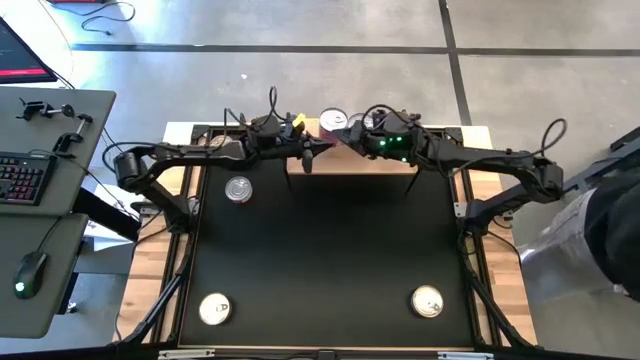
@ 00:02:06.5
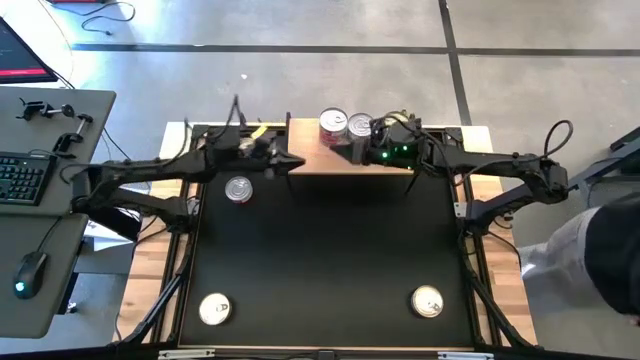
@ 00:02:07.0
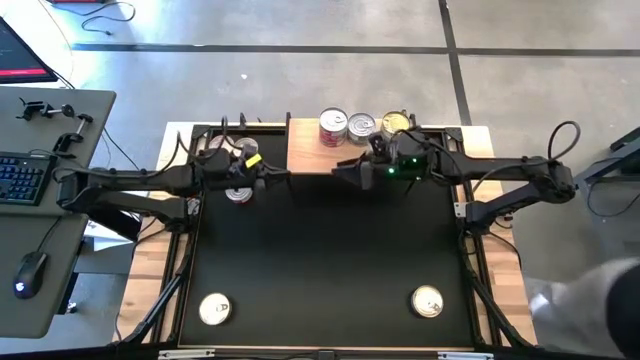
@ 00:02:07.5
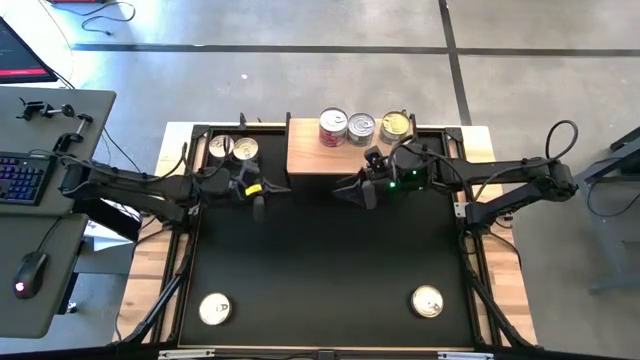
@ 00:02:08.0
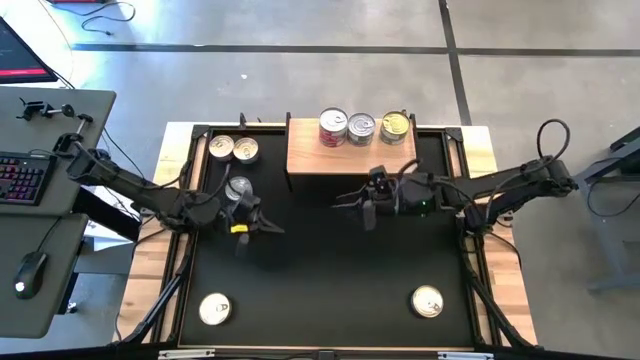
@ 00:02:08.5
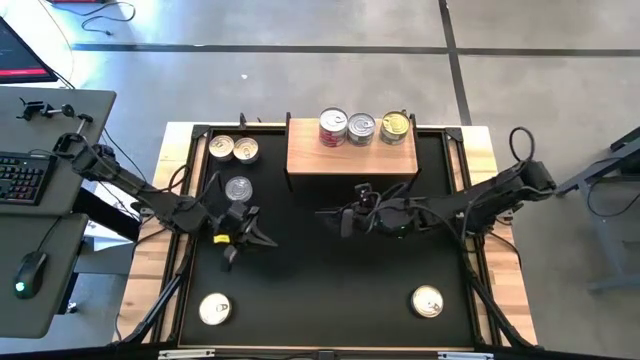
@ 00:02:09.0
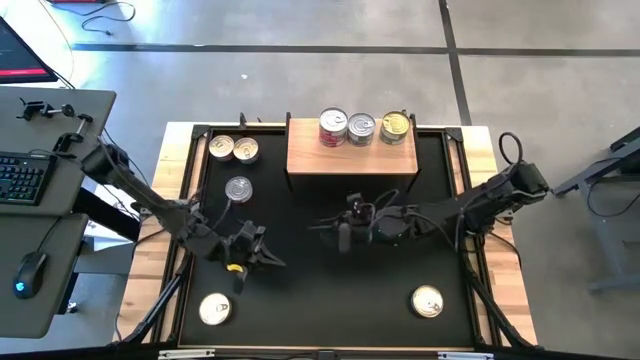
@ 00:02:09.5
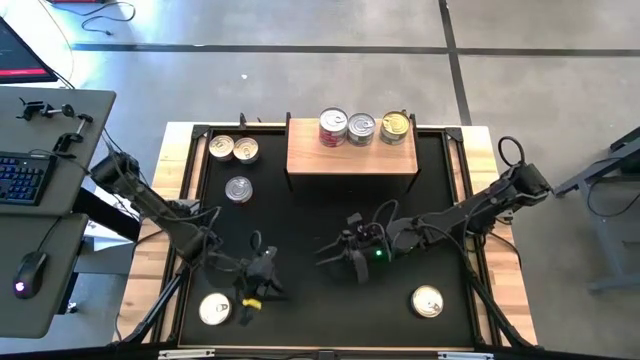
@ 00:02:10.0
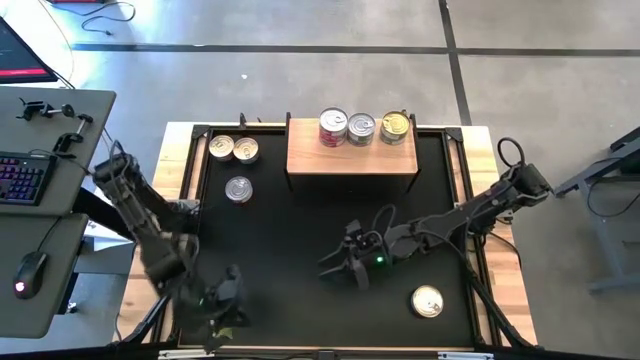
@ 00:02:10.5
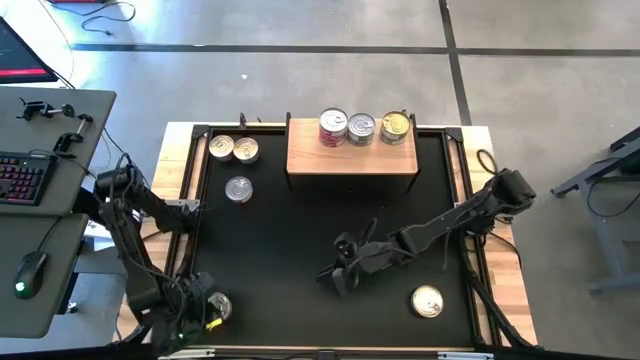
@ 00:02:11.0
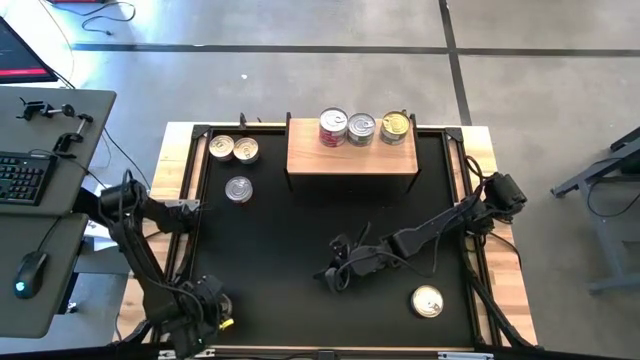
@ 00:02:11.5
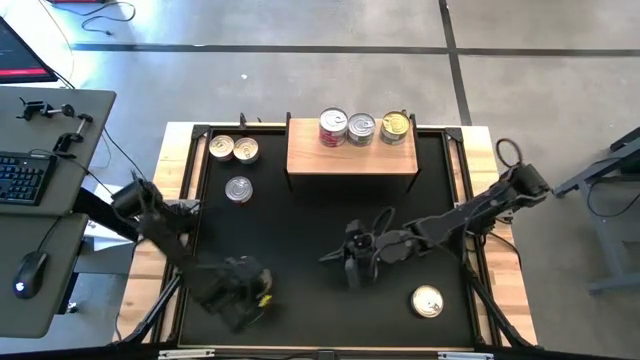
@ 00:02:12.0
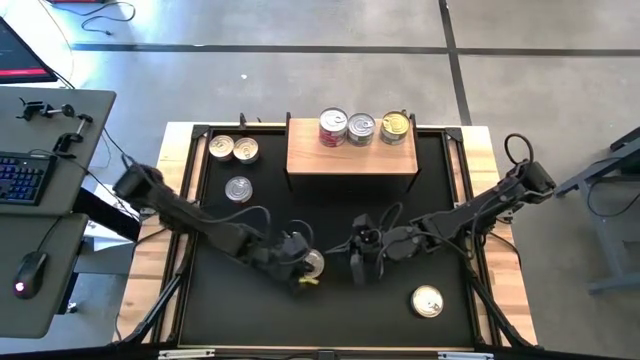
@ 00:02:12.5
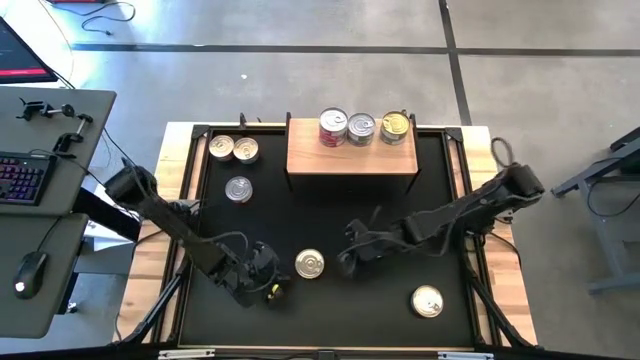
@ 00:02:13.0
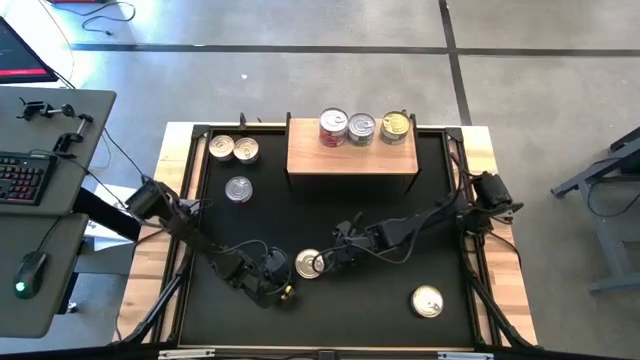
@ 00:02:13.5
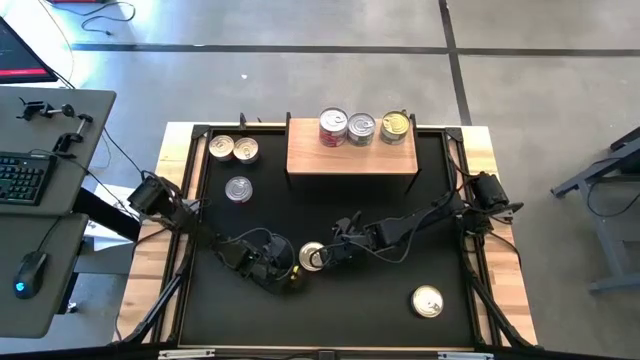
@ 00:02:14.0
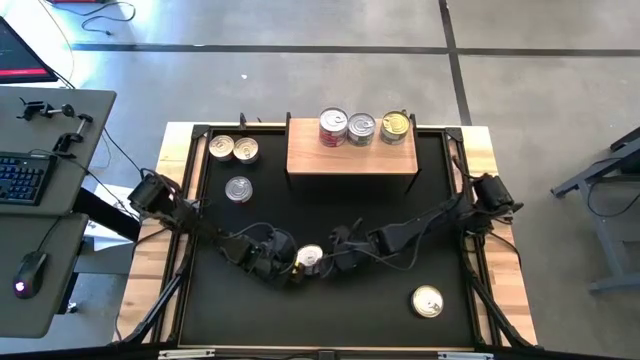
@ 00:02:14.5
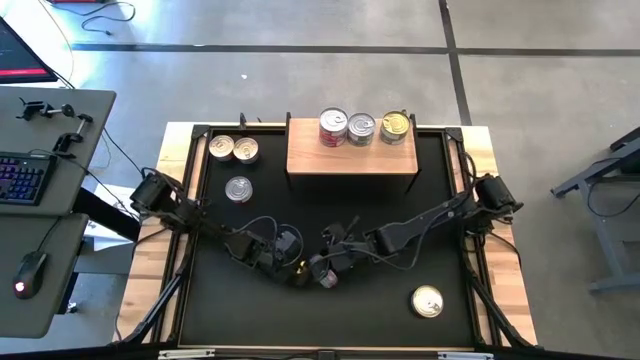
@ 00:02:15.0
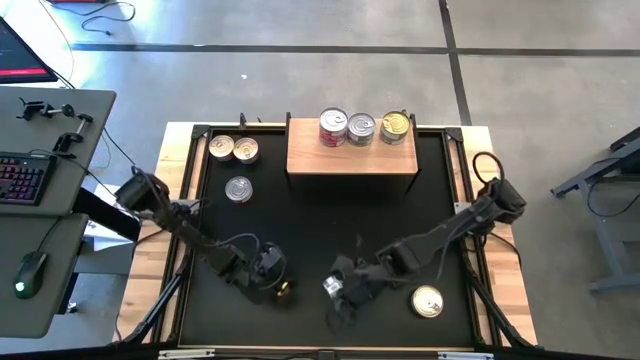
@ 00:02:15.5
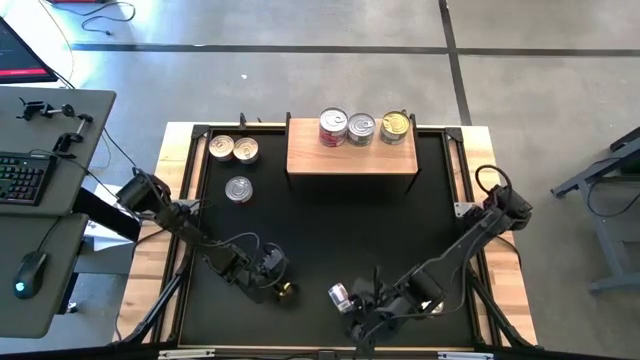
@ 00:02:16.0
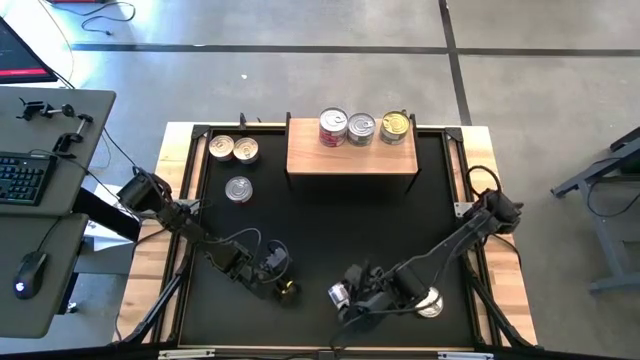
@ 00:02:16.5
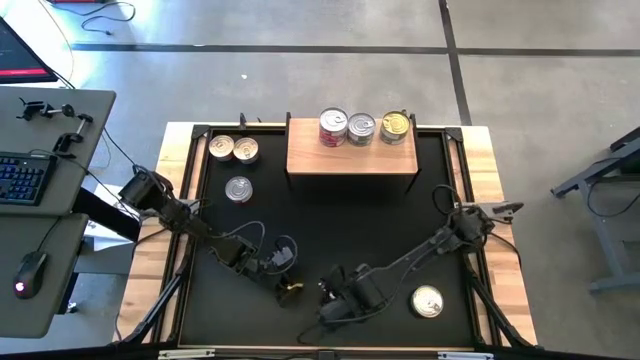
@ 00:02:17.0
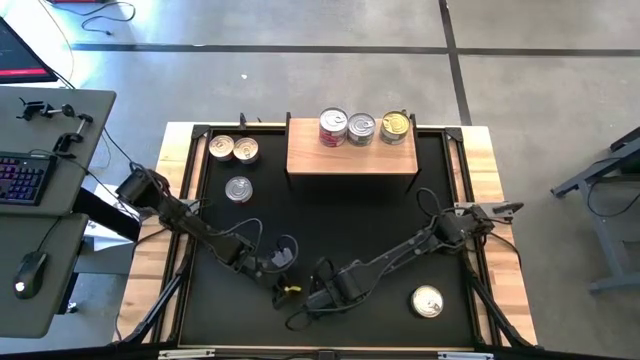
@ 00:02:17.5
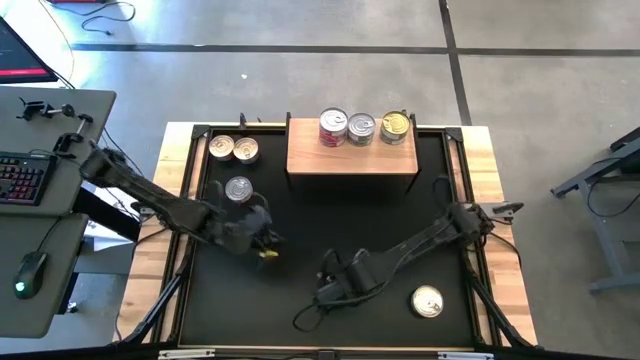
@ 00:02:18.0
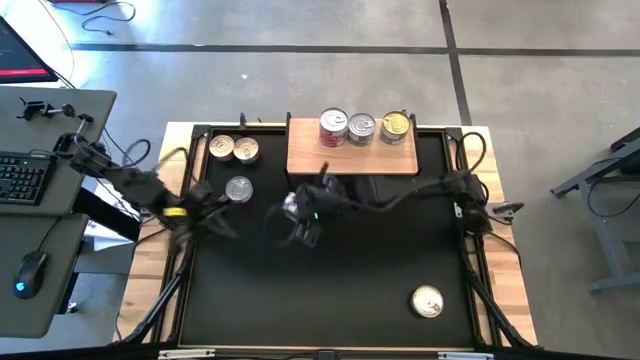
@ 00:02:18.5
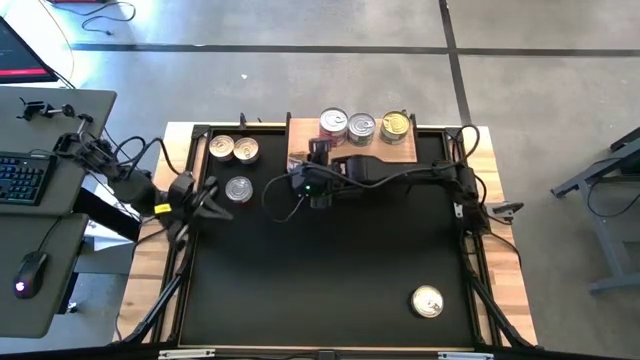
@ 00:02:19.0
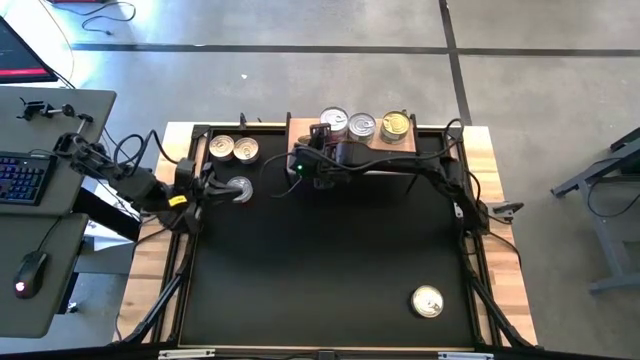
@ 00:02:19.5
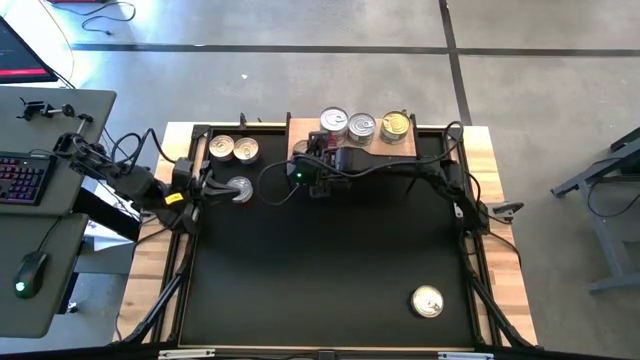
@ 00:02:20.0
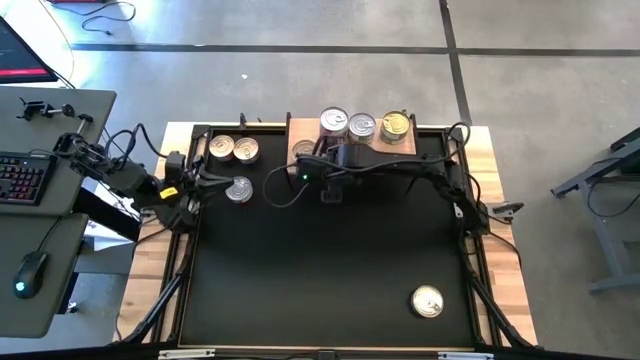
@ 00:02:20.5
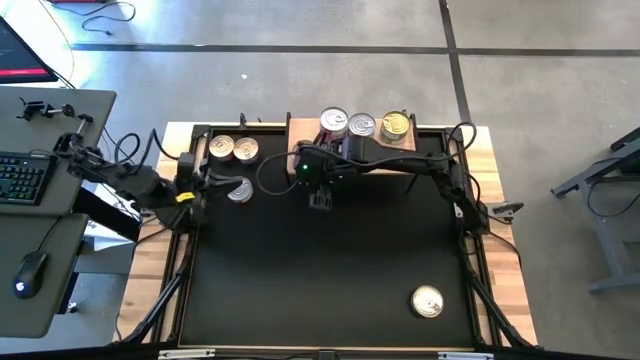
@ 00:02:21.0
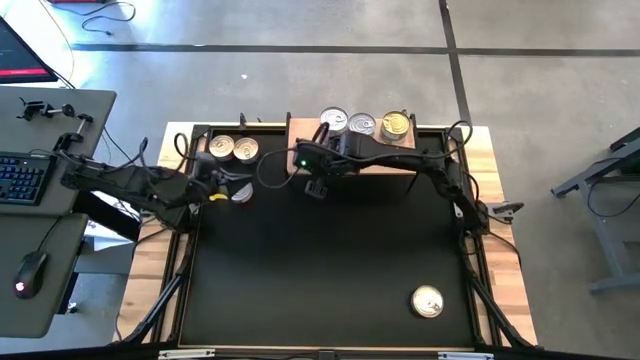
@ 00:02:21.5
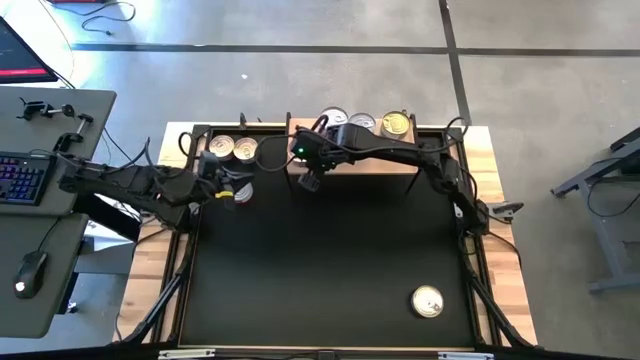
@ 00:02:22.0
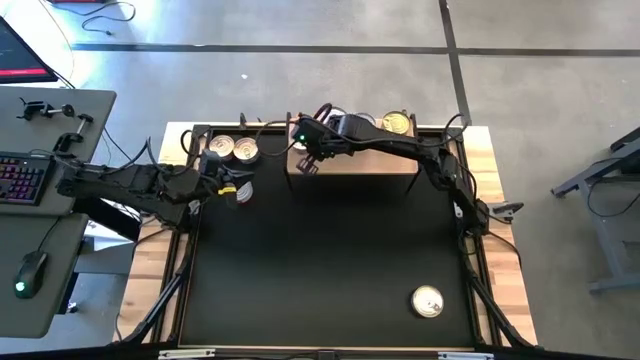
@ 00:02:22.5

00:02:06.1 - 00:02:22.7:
Task: Stack canned seafood by type on shelf
Put the blue-pink tuna can on the shelf

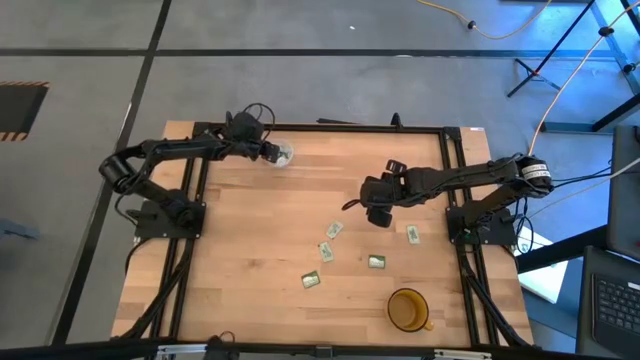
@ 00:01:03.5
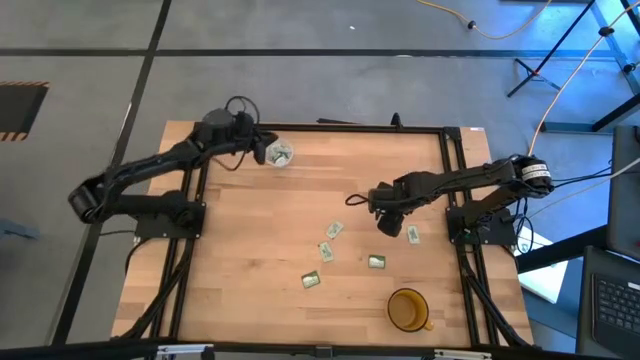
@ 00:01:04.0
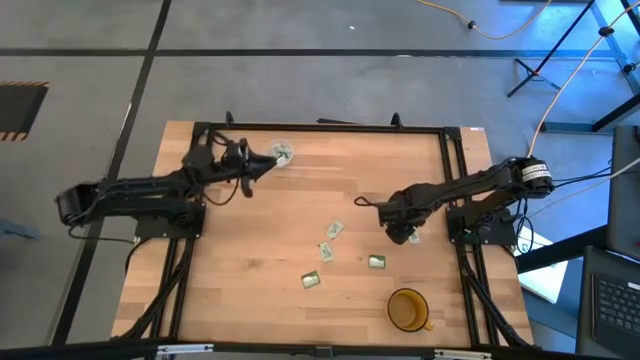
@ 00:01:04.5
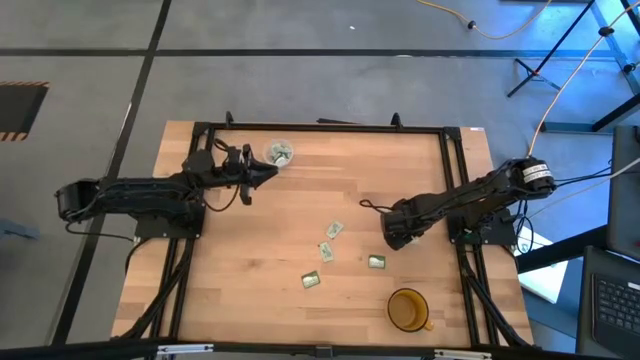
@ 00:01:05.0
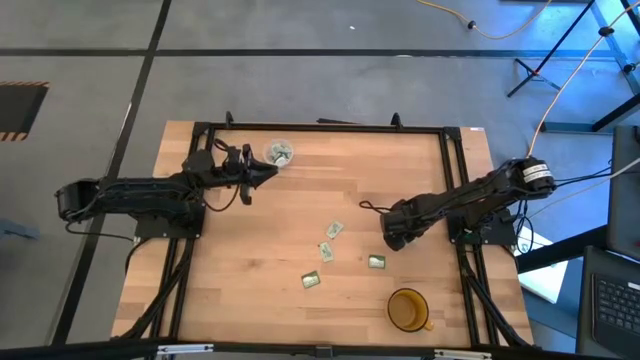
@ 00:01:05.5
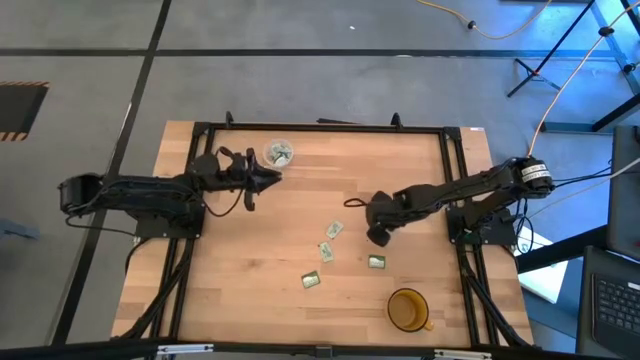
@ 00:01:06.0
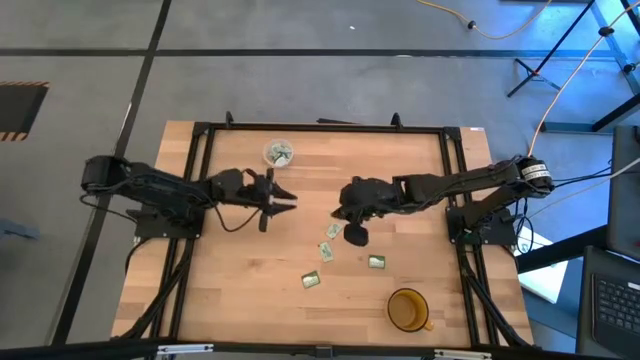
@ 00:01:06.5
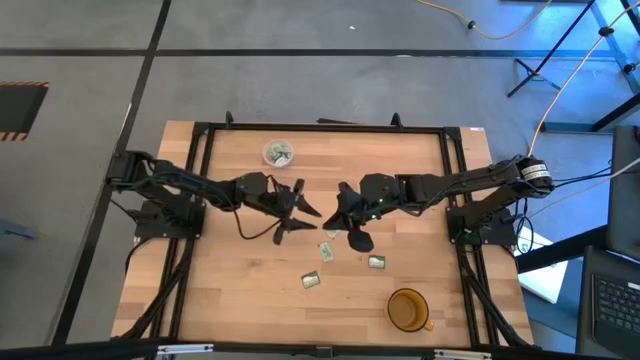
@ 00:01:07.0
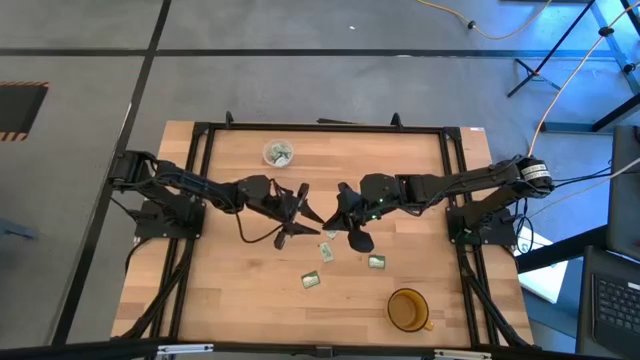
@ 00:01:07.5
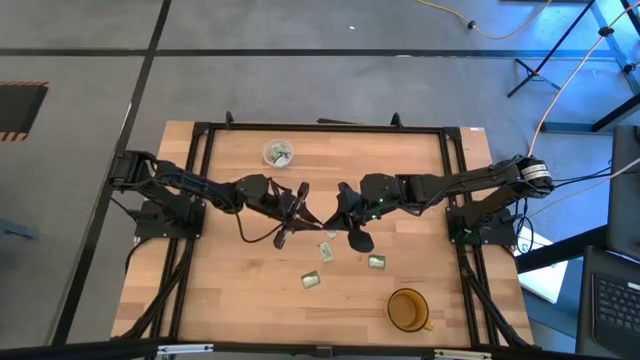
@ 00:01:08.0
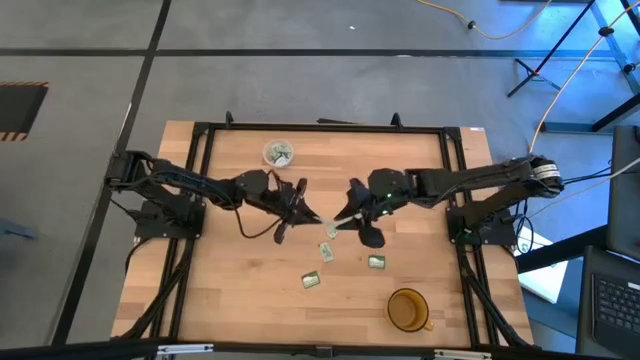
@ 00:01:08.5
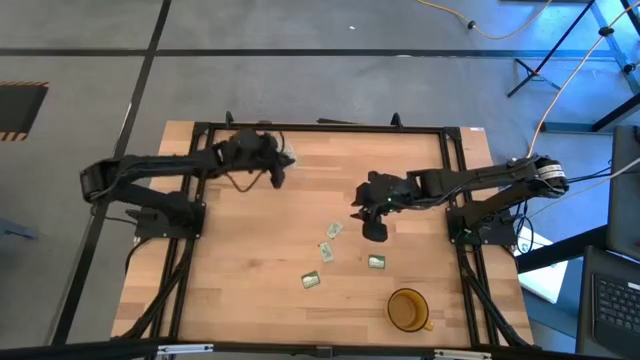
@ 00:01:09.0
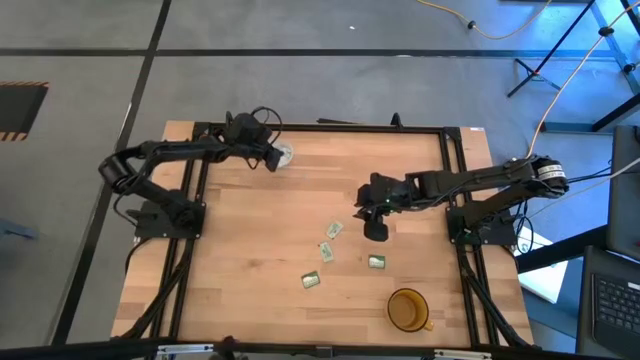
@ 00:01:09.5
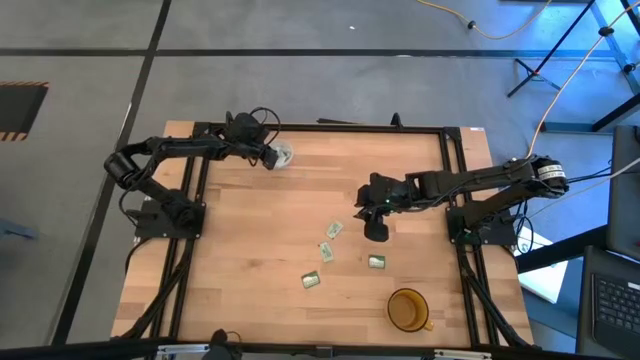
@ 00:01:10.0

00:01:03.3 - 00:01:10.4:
Task: Pick and place Stevia / Truvia into bins
Put the stevia packet into the transparent container
